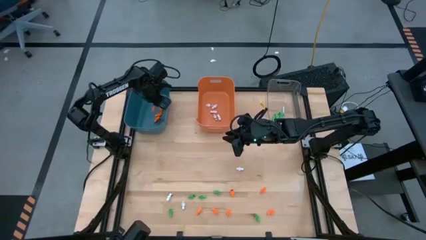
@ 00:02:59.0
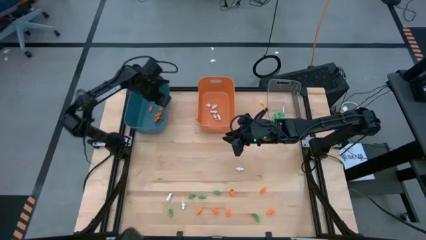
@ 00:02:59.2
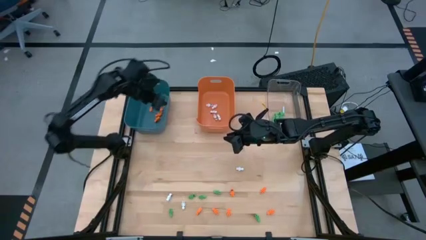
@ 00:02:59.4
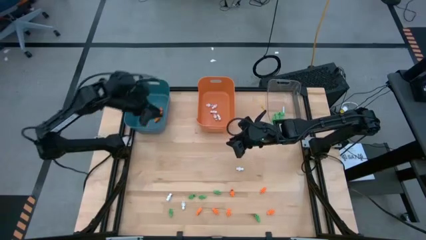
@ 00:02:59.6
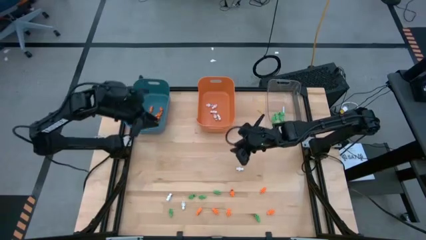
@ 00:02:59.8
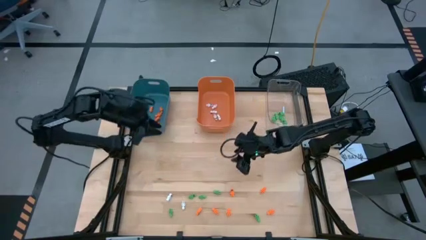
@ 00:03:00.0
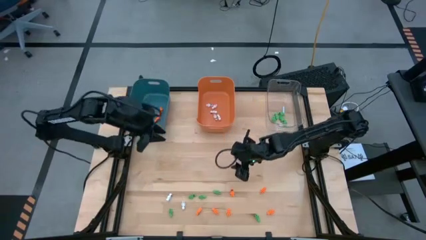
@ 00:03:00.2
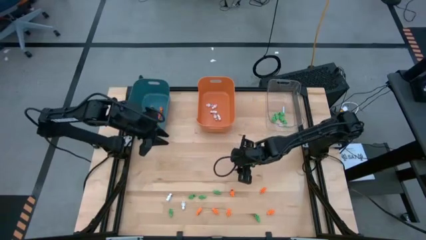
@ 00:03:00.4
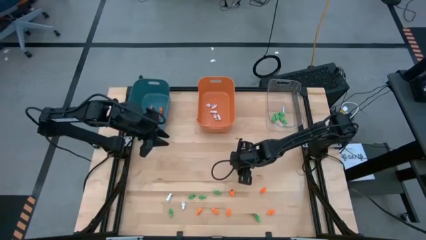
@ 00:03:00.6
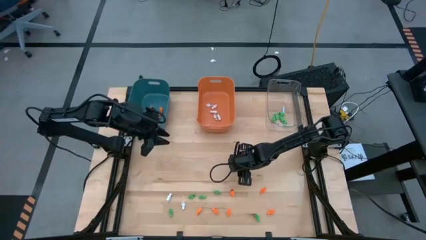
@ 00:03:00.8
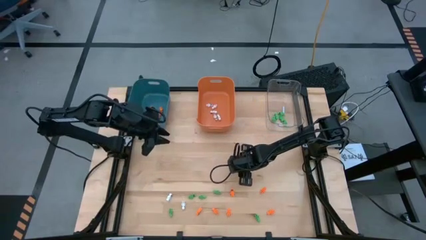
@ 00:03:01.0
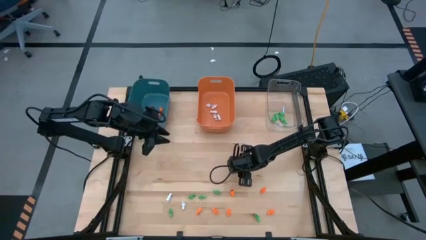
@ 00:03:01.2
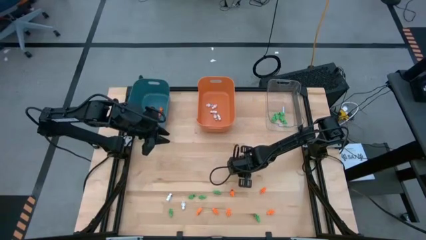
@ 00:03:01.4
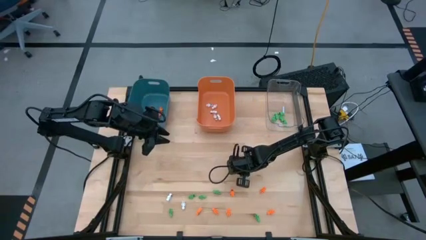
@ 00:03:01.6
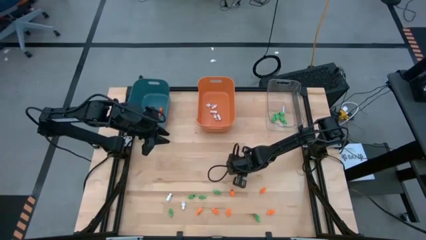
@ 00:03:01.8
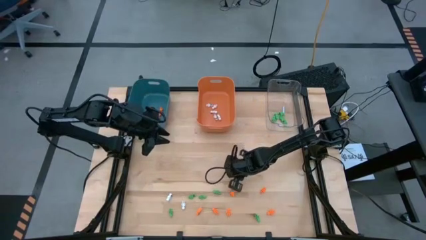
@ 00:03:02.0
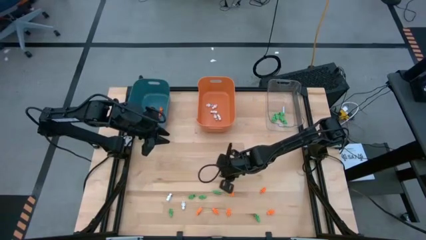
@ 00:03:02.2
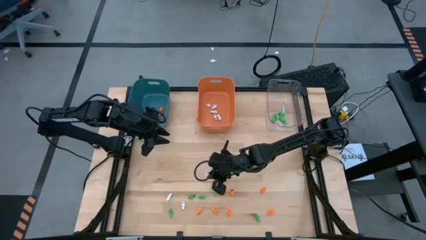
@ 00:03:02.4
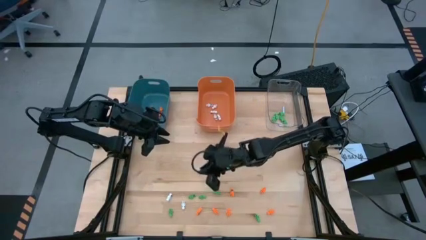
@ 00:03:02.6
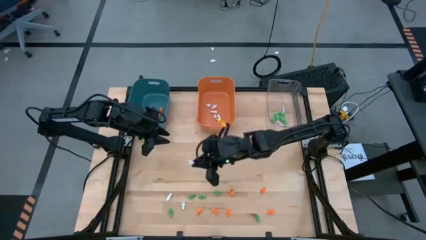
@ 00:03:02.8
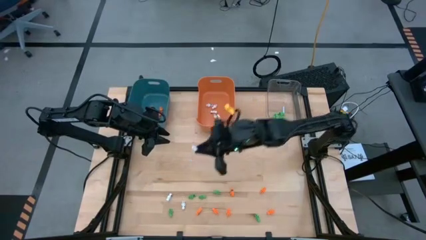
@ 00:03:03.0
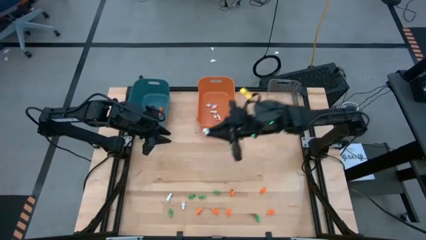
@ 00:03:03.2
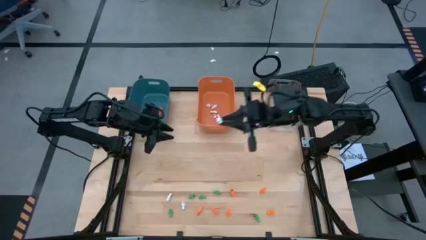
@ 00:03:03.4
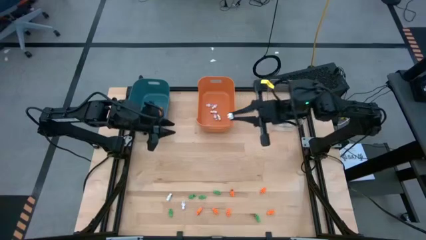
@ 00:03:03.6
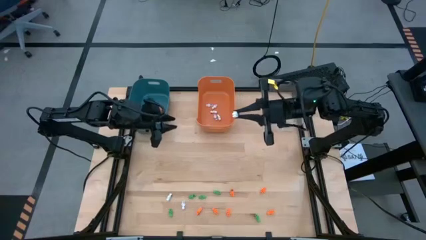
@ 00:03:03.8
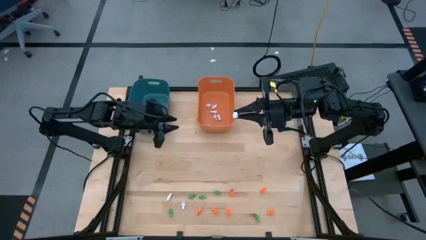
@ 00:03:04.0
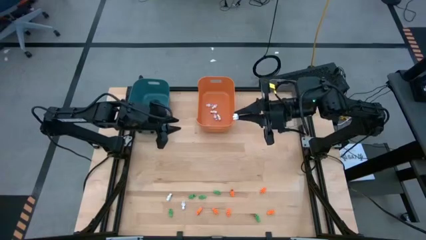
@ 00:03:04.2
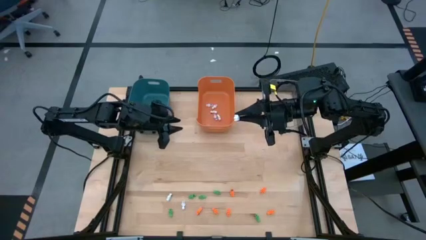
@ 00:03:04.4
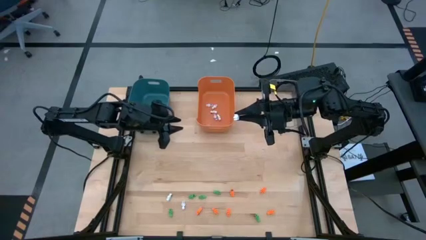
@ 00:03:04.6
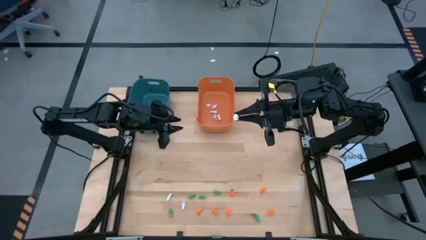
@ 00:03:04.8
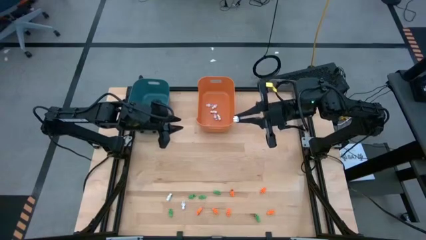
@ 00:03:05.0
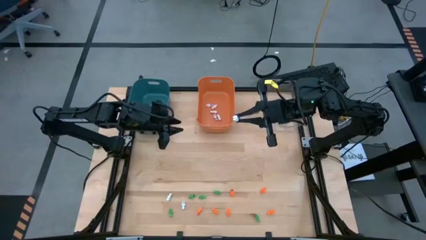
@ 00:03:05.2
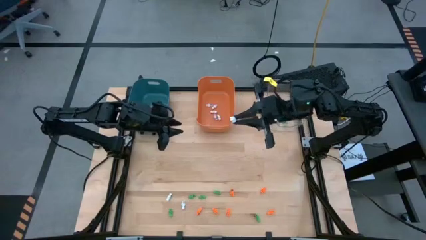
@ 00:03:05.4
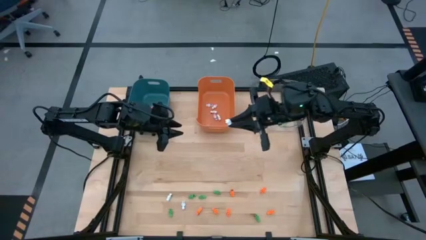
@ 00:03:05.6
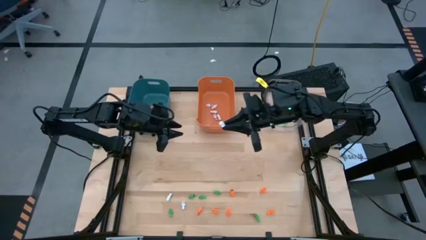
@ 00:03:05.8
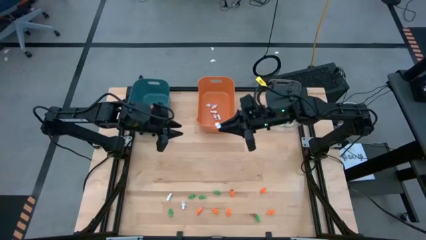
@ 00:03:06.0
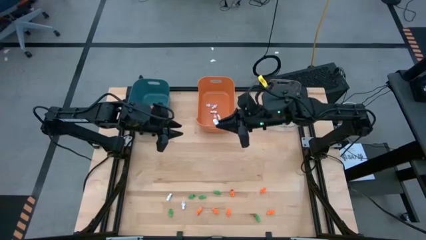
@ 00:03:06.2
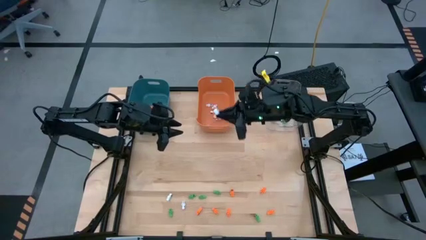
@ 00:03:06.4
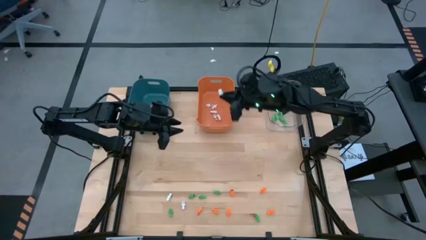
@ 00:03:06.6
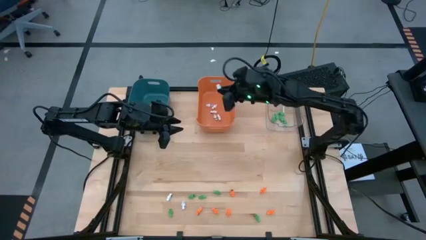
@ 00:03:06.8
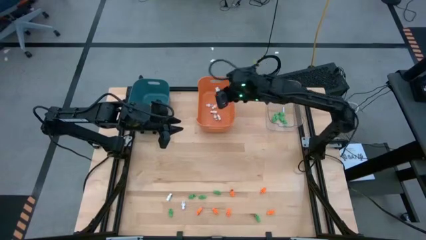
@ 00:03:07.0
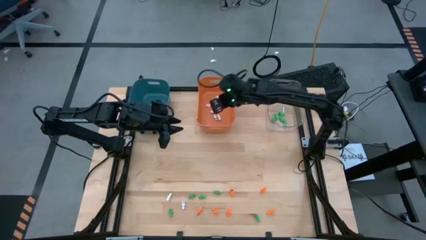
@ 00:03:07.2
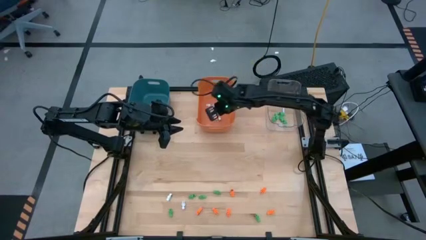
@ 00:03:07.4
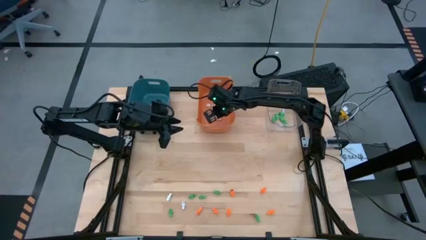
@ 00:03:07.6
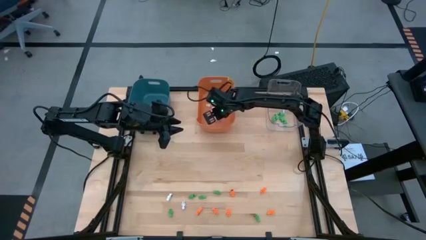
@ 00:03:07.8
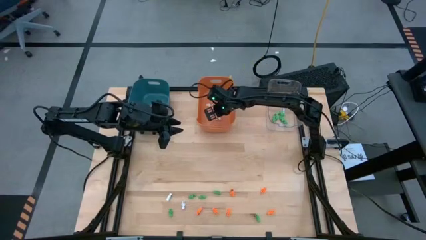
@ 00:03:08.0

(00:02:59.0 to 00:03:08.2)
Task: Sort Halloween decoration
Put the white skeleton toy into the orange bin
